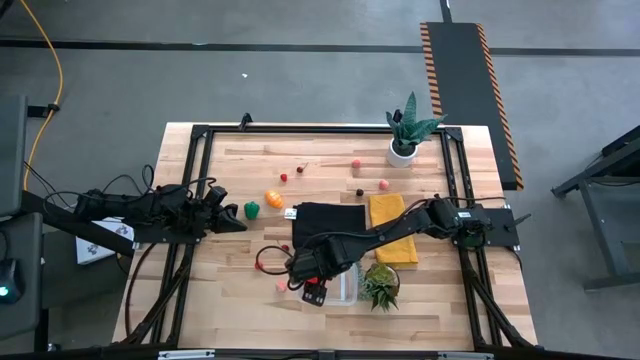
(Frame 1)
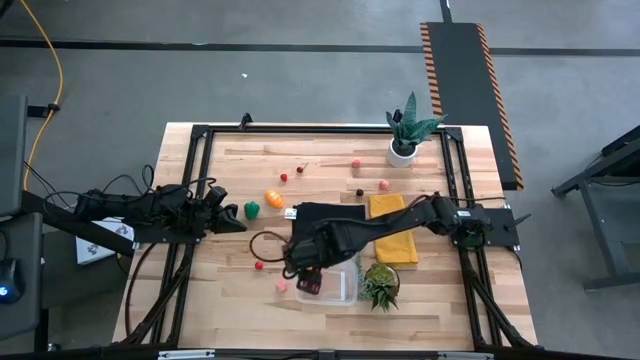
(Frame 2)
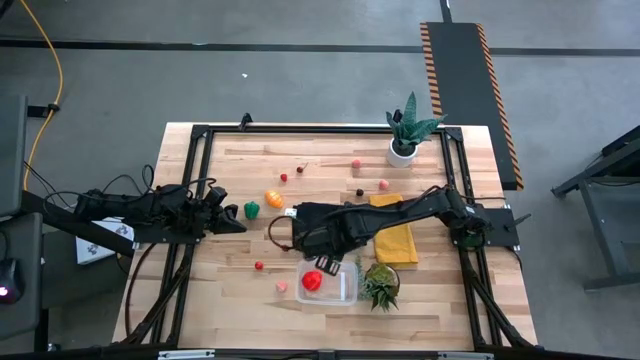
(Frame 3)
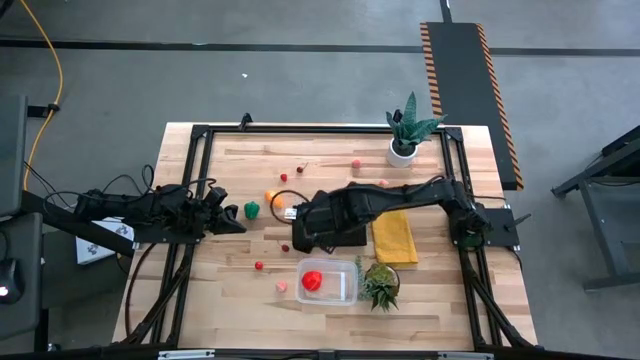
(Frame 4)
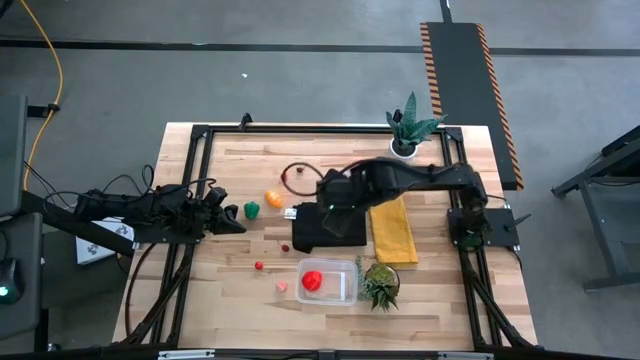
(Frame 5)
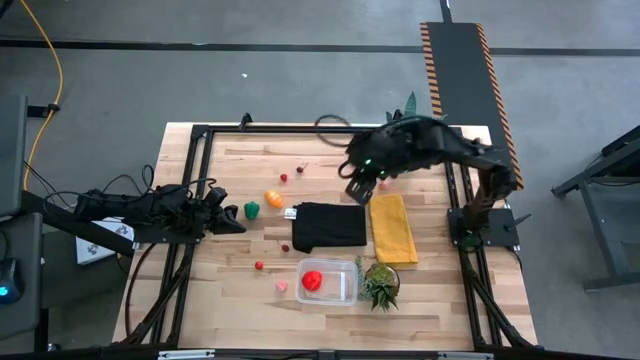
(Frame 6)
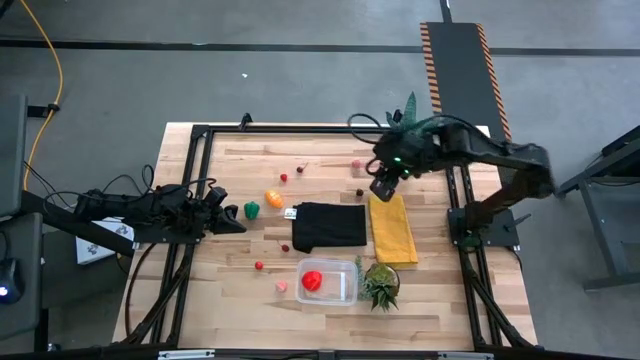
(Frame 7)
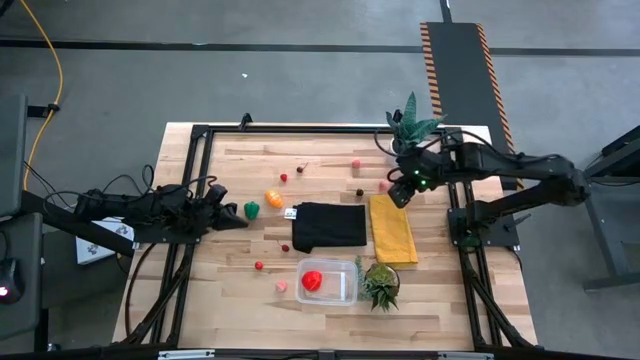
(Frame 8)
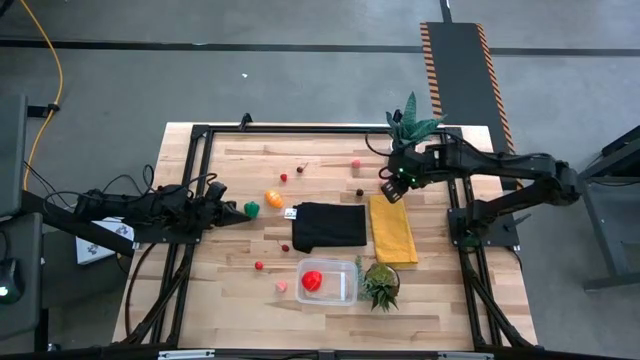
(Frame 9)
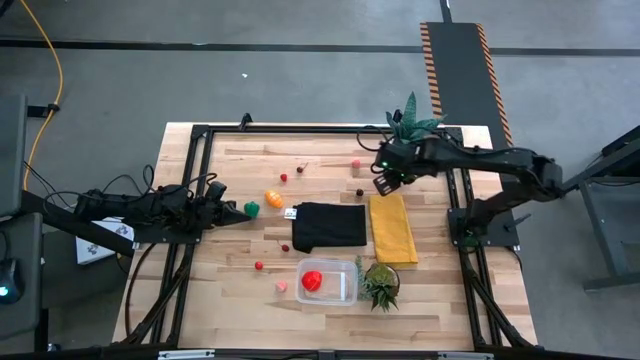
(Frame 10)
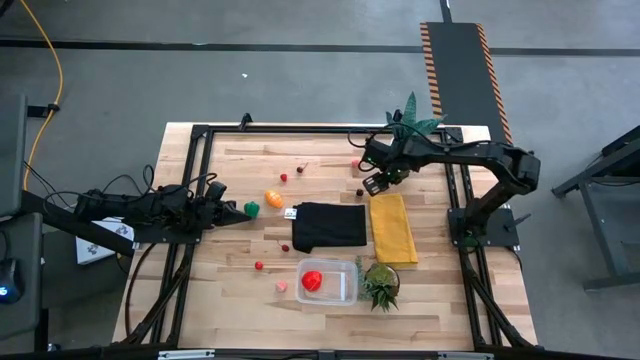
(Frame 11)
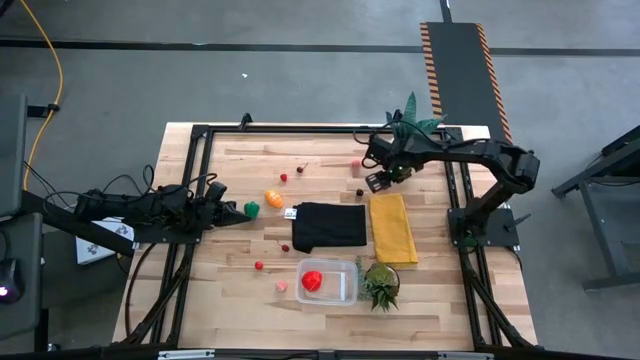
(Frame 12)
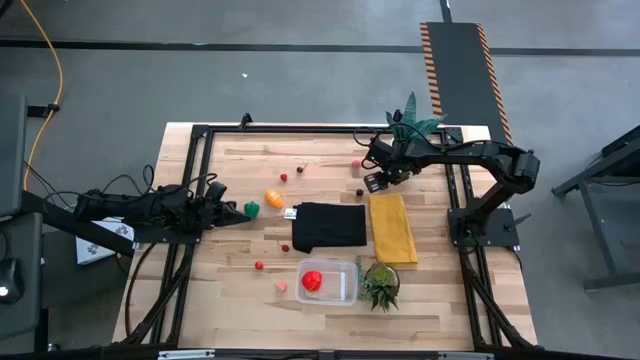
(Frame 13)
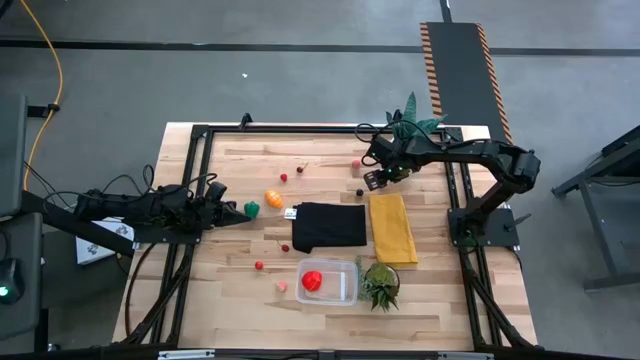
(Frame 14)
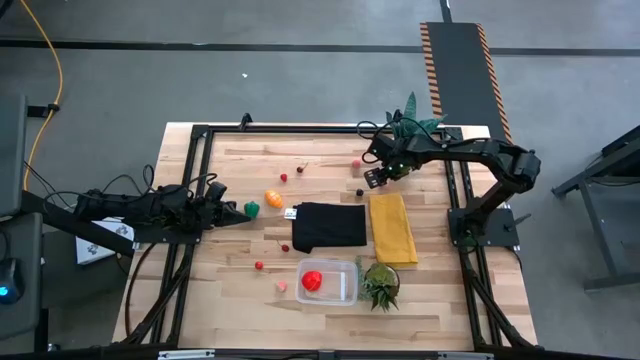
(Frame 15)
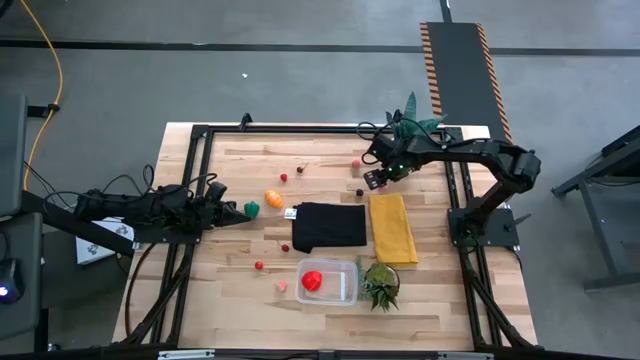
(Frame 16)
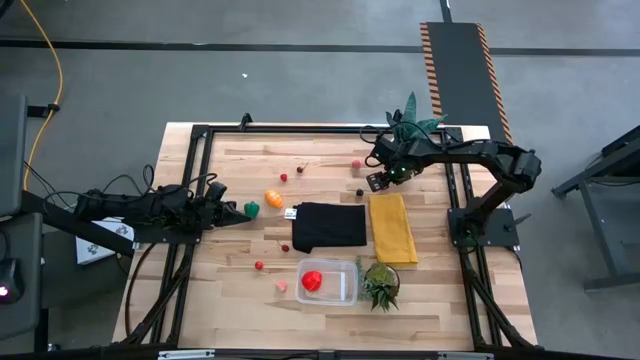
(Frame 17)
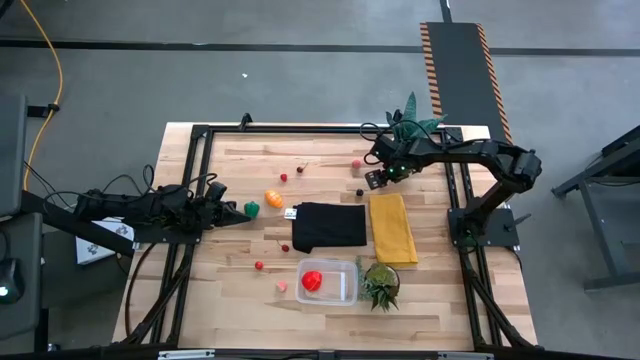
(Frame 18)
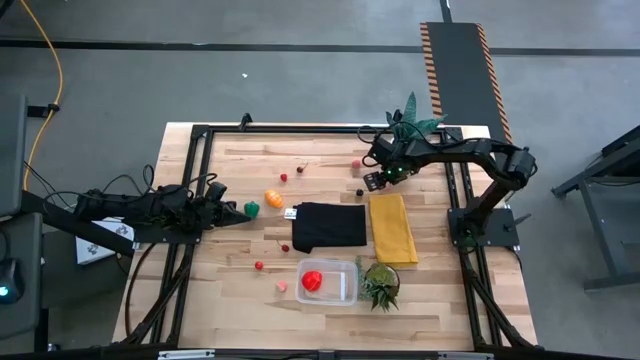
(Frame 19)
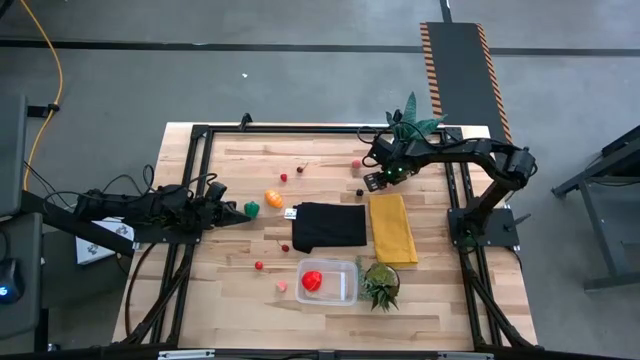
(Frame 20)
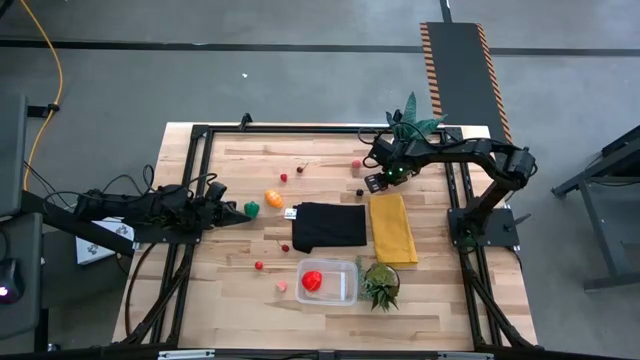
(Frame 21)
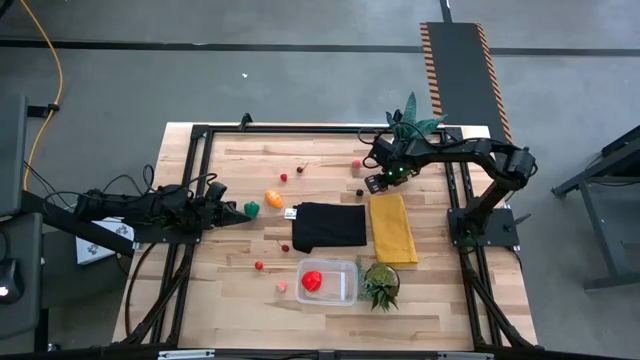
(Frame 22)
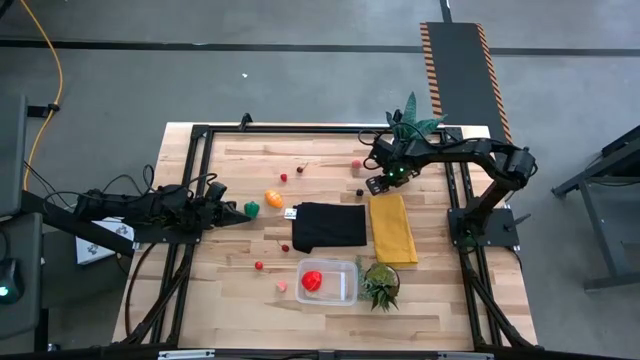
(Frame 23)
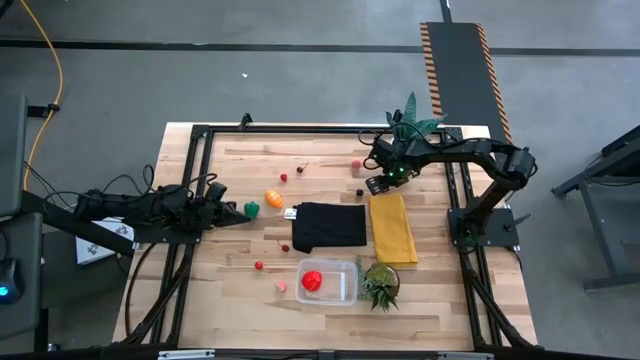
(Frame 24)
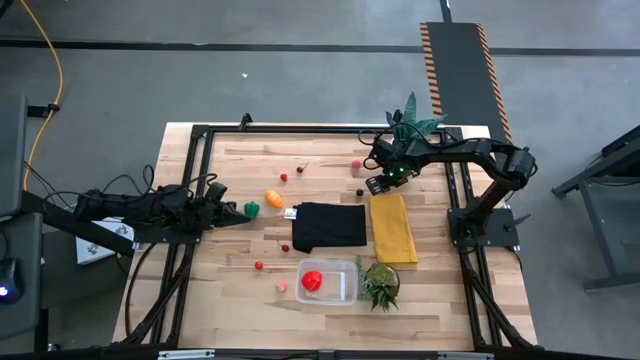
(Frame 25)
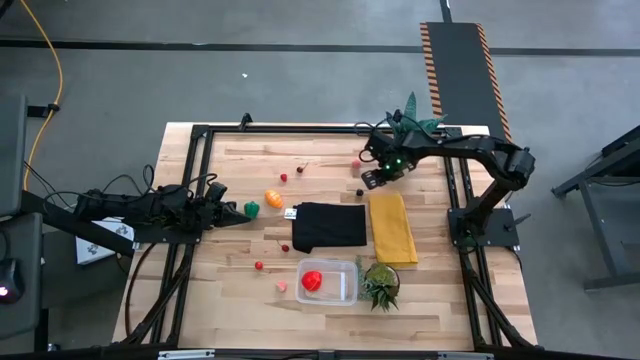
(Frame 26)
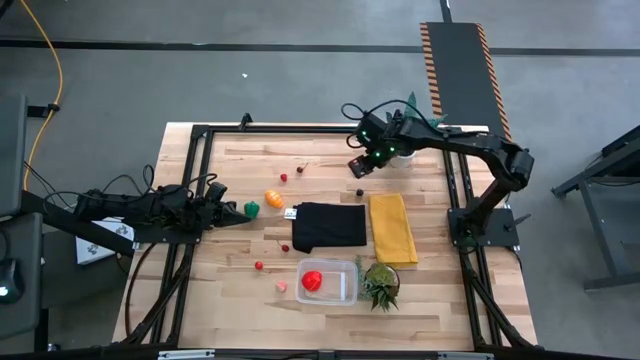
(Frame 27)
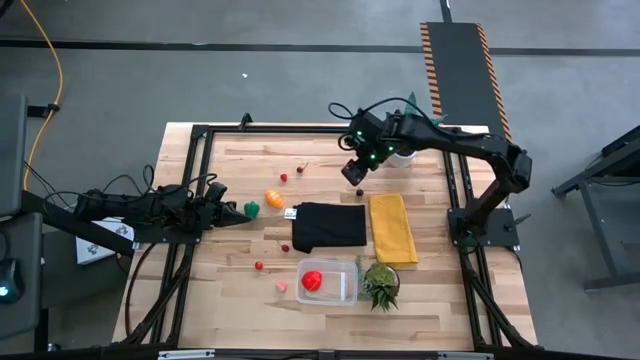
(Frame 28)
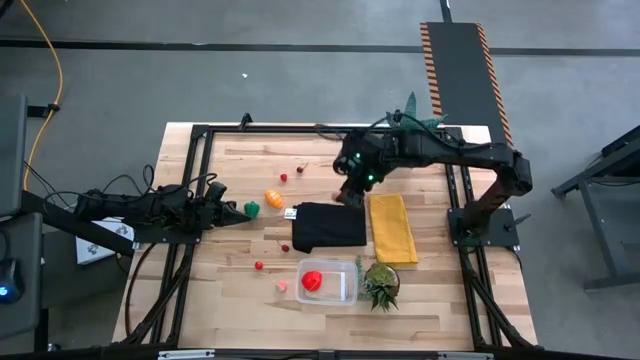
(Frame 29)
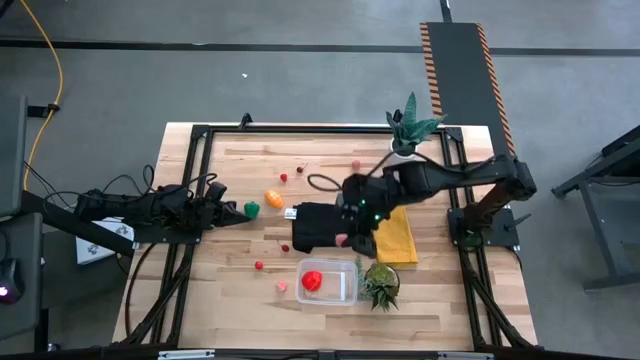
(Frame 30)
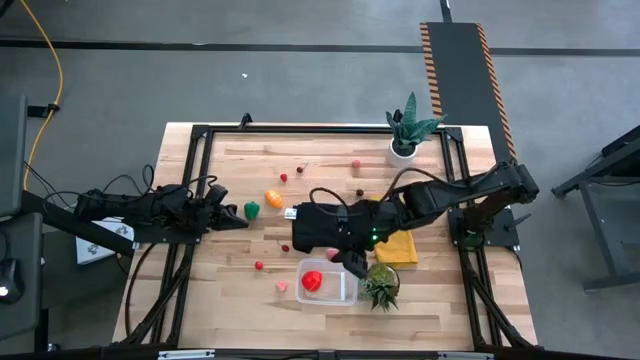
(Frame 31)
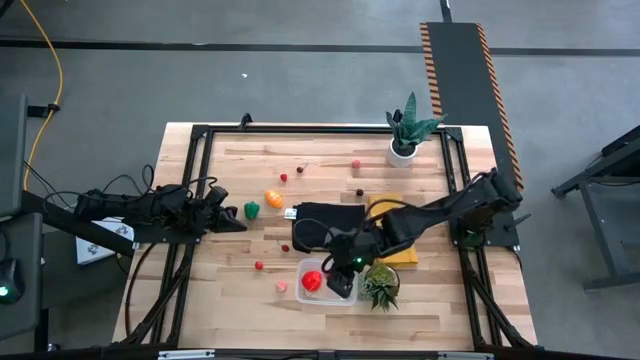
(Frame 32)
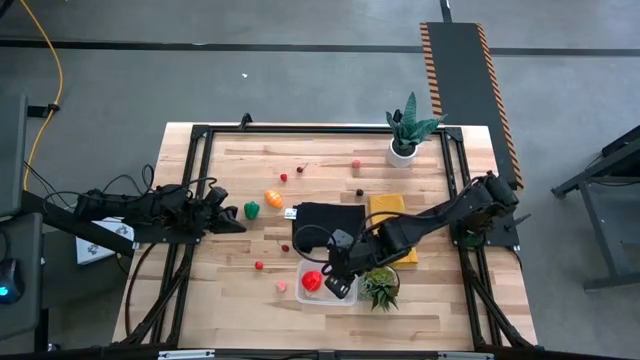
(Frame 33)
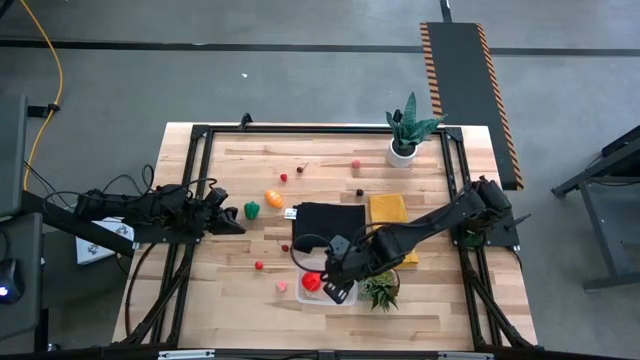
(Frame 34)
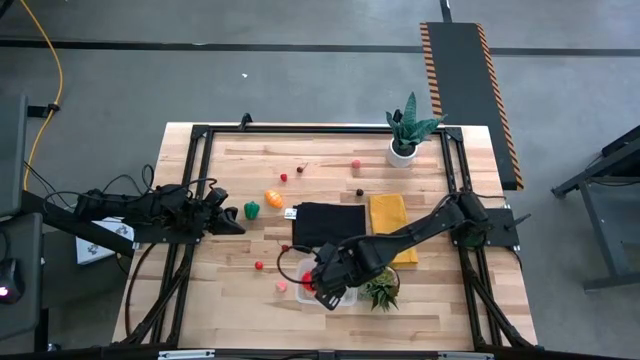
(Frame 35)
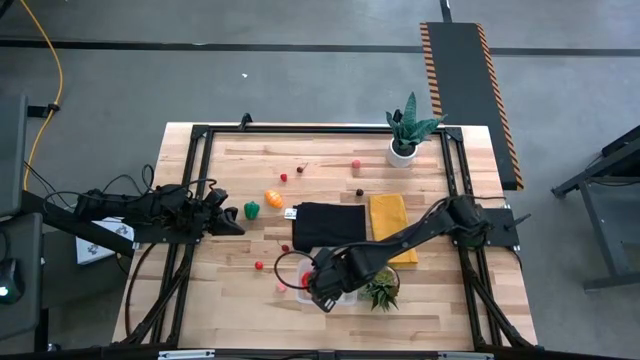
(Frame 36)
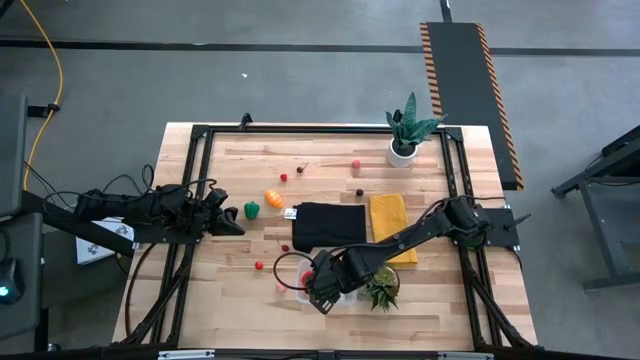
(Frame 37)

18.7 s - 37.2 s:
Task: Pick and placing Produce into tupperware
Put the middle peach into the transparent bin

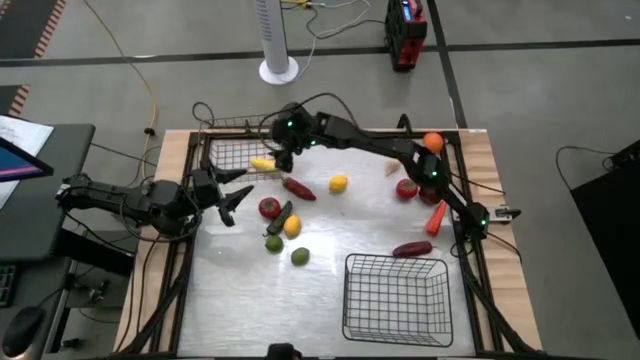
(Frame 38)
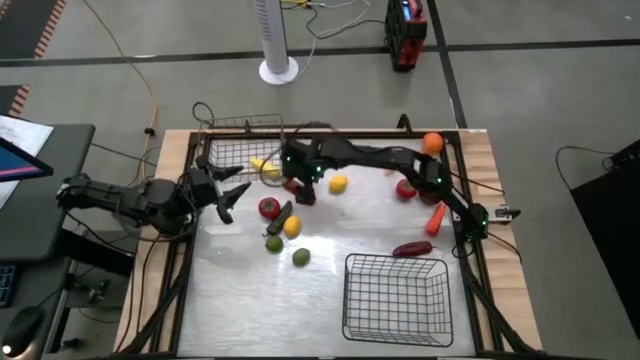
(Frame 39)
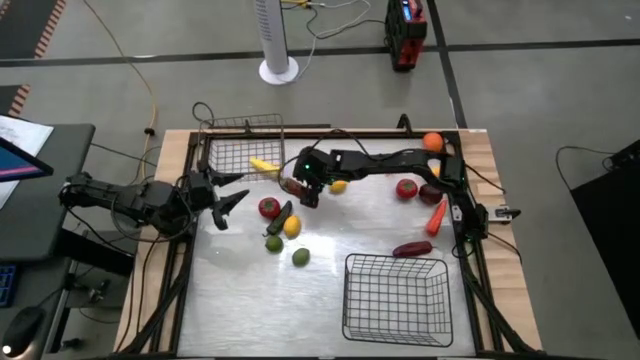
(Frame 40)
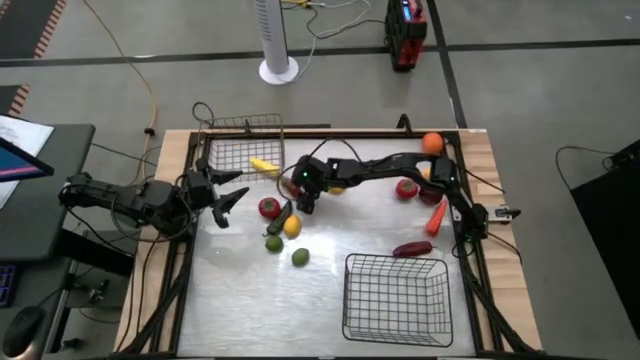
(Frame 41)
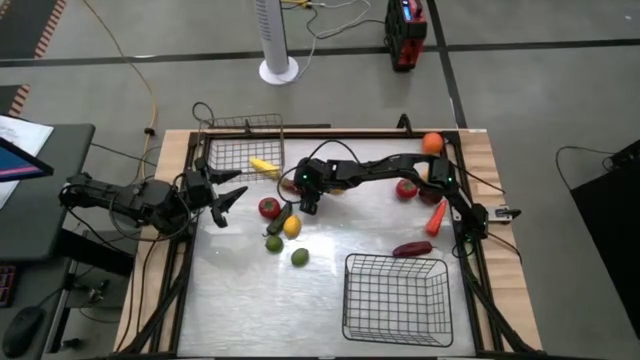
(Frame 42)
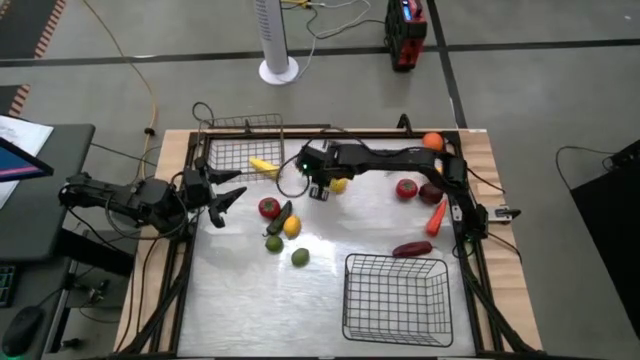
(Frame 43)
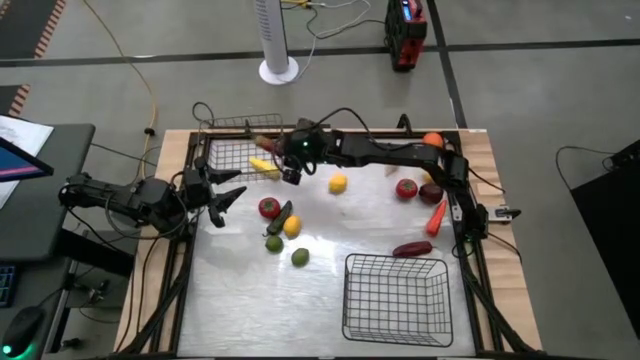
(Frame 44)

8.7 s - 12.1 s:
Task: Sort produce into baskets
Put the top chili pepper into the top wire basket
